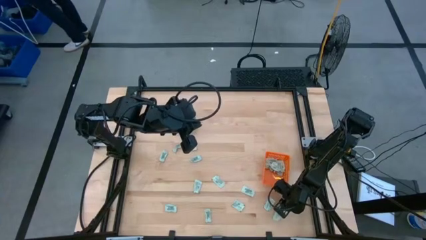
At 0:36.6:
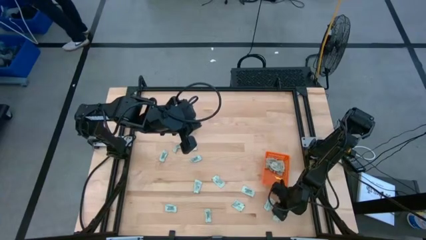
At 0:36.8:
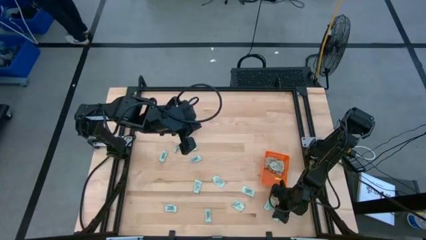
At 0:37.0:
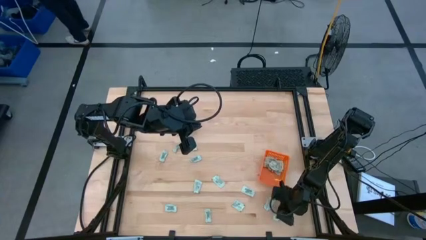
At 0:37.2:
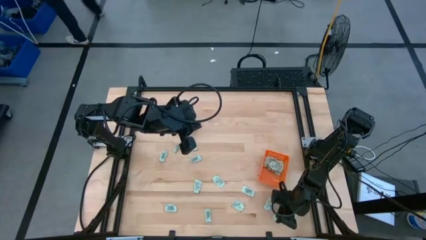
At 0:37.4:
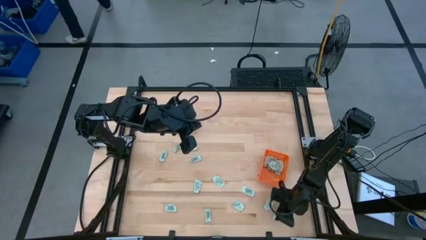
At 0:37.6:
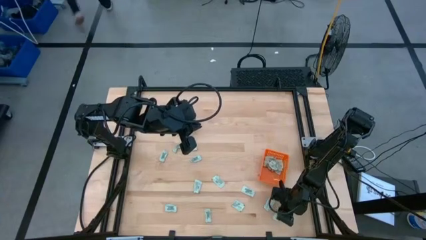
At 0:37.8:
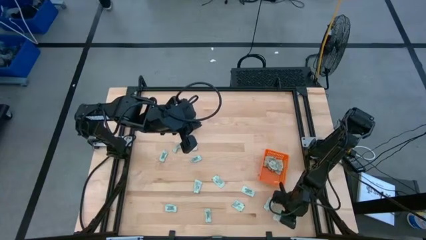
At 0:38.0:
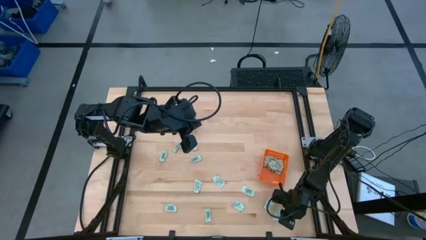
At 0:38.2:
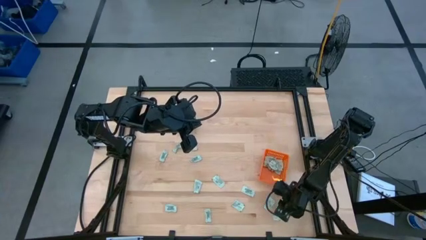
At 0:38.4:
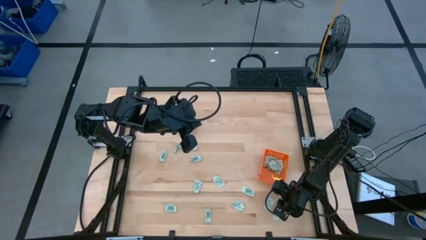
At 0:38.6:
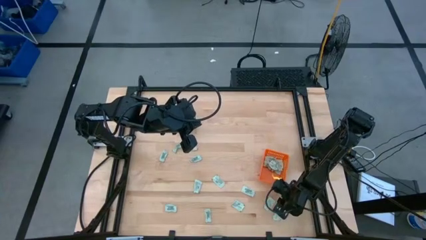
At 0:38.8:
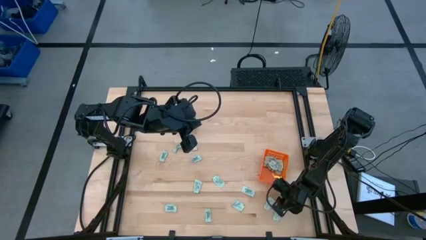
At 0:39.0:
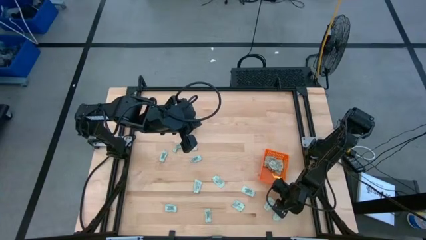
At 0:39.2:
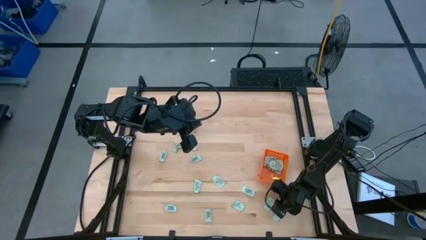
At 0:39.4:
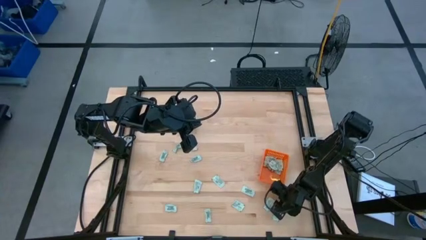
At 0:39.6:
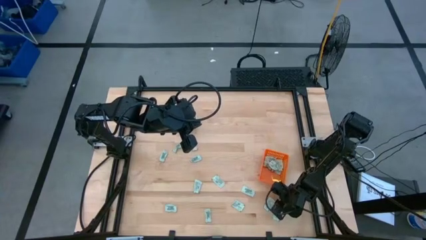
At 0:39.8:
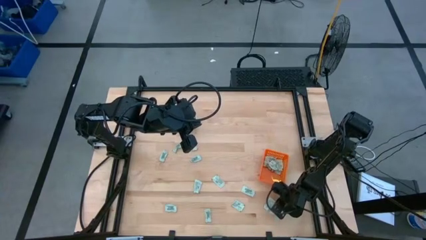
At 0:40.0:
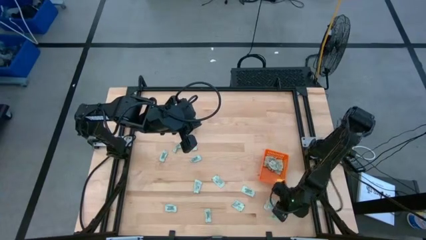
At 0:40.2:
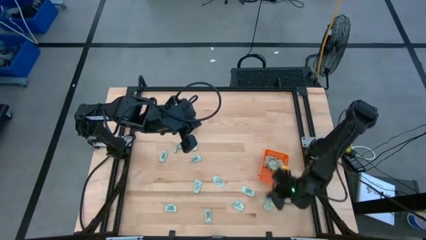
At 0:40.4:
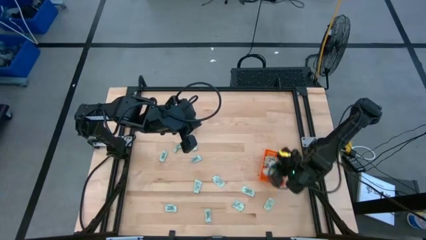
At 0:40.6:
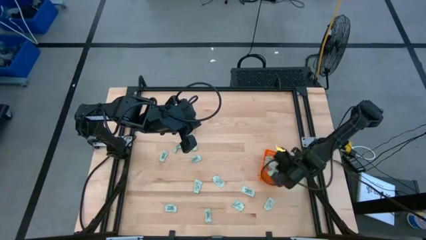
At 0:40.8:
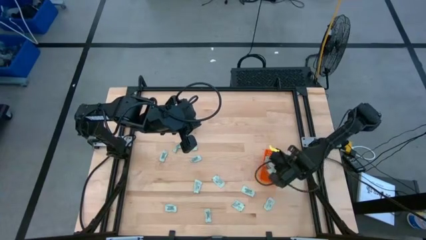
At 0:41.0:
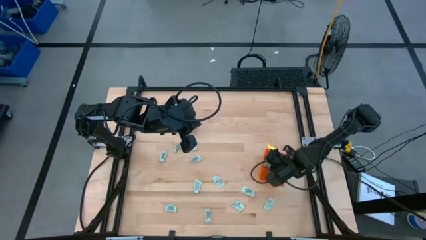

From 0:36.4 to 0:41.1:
Task: Pick and place Stevia / Truvia into bins
Put the stevia packet into the orange basket

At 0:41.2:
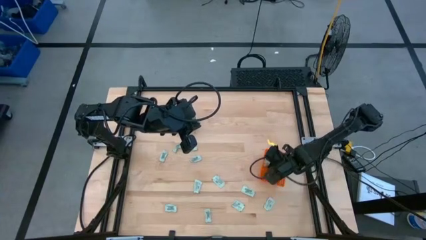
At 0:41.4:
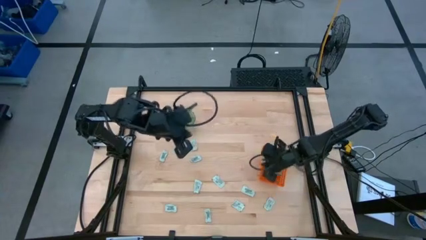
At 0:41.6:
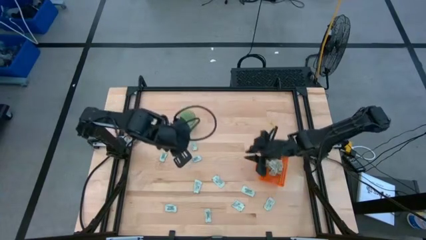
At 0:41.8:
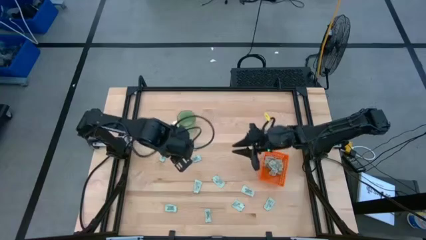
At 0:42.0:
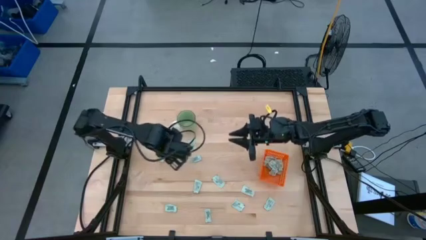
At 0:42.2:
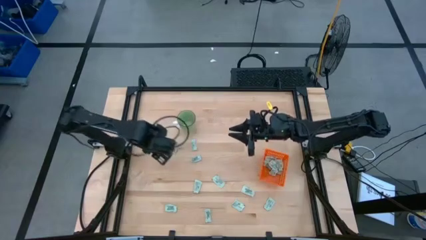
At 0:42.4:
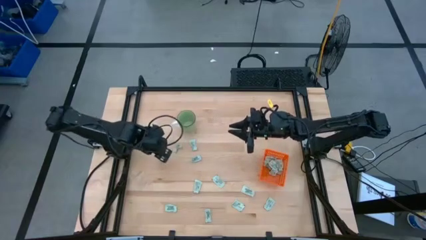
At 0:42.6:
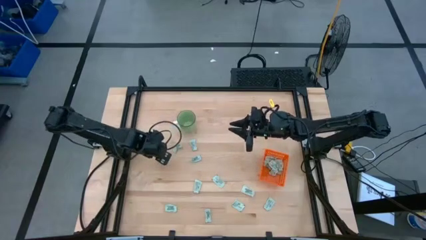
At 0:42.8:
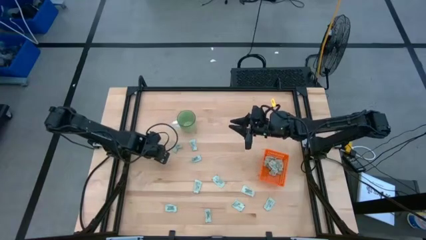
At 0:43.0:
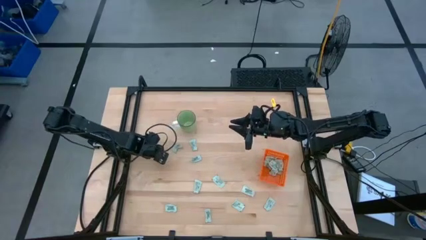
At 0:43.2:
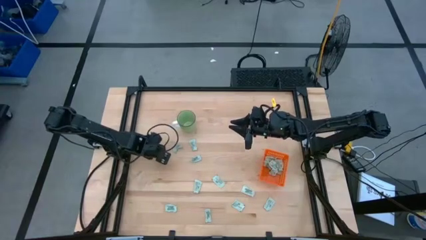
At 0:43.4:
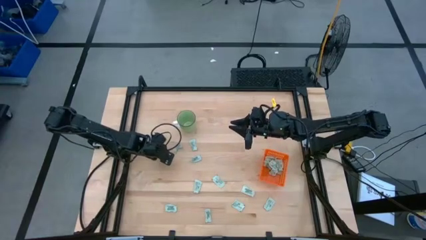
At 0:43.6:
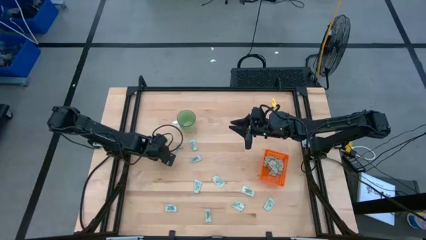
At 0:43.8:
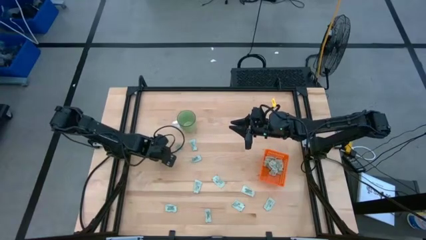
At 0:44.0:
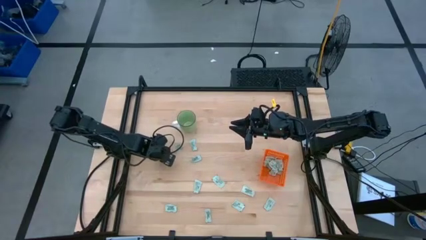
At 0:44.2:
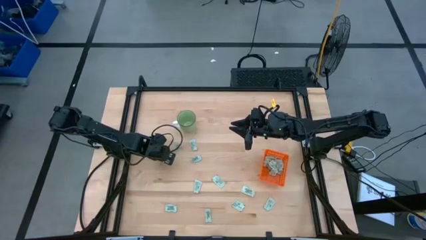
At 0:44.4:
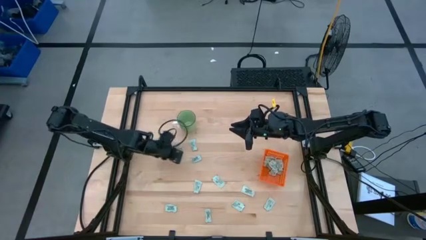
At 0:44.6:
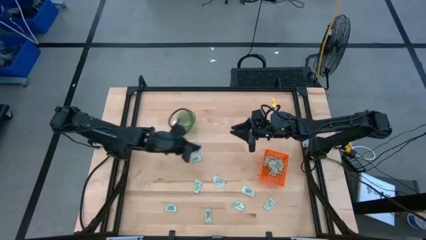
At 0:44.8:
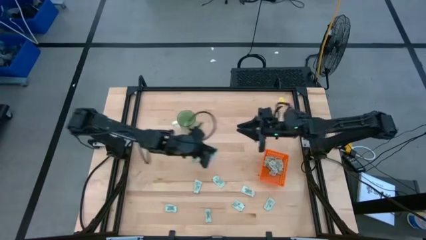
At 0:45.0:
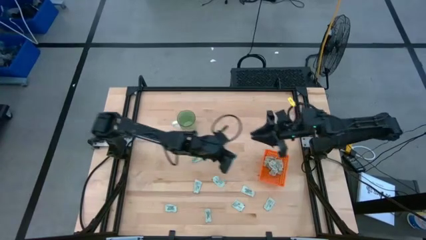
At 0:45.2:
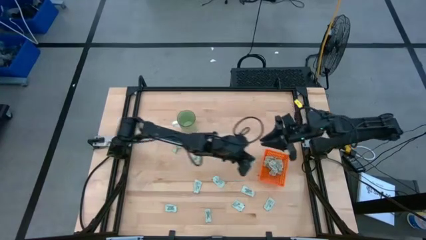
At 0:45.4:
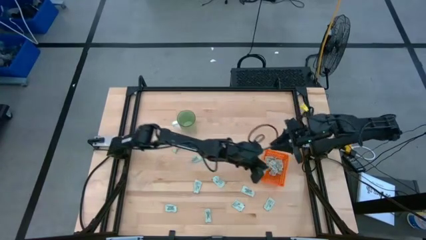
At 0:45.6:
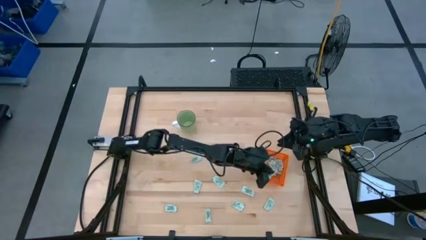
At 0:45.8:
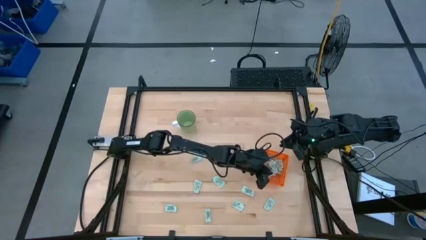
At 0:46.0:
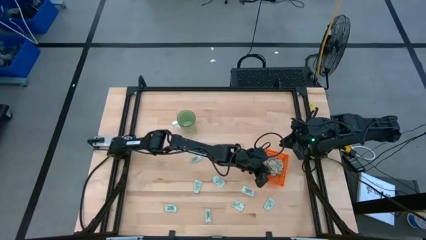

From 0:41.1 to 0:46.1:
Put the stevia packet into the orange basket

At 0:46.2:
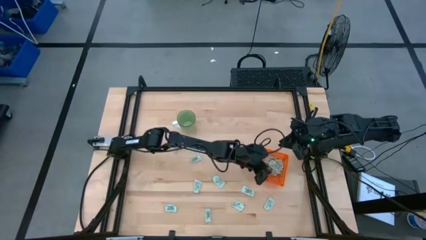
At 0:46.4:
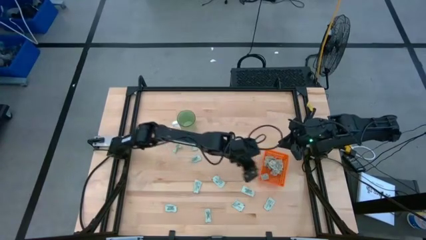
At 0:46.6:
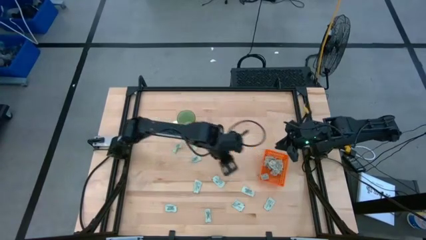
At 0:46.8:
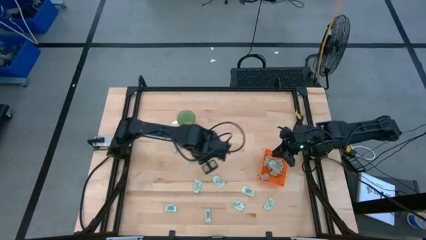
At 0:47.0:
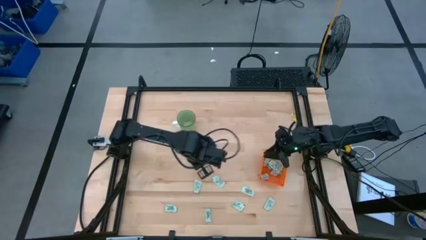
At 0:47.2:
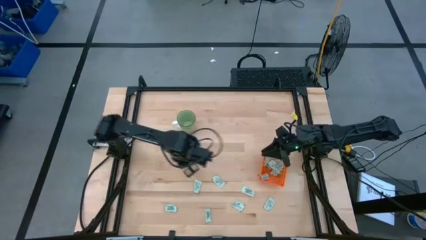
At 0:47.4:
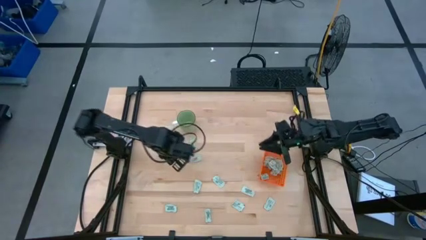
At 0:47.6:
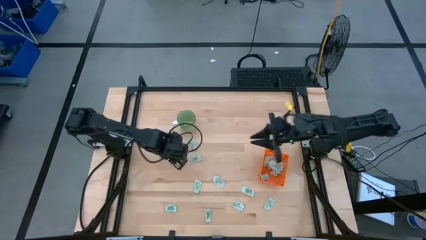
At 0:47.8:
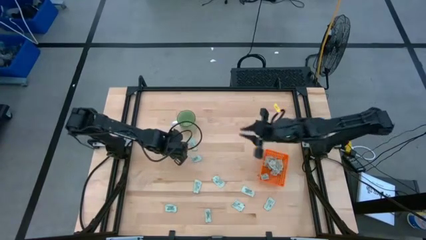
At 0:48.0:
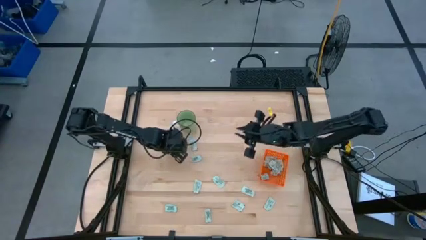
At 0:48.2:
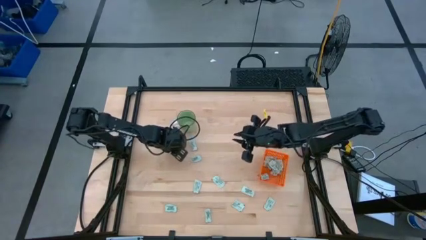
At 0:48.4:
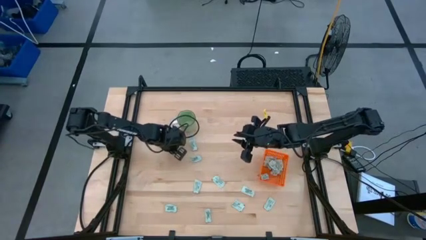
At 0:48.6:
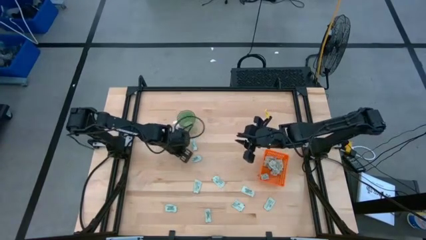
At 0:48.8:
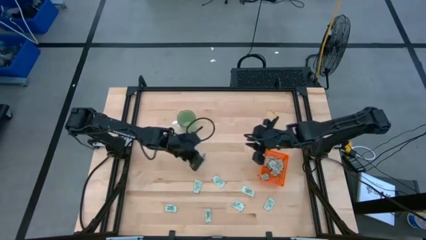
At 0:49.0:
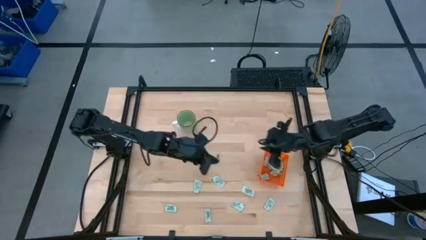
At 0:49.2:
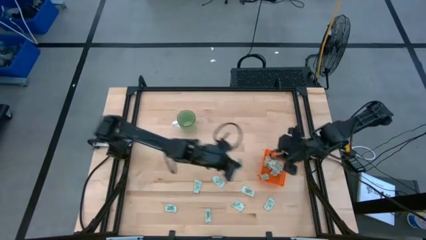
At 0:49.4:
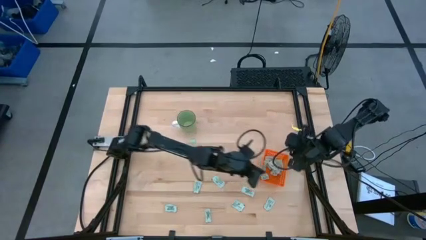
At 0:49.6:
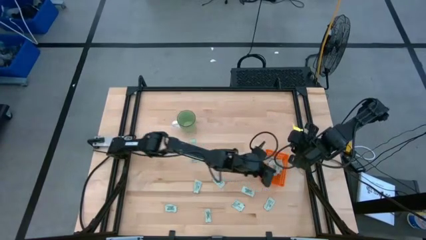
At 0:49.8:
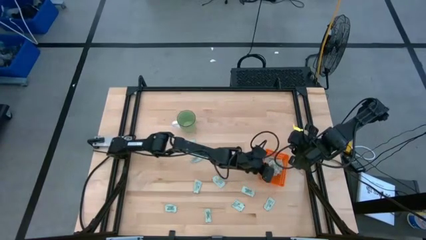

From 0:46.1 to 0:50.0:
Put the stevia packet into the orange basket

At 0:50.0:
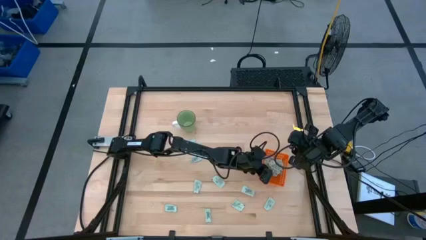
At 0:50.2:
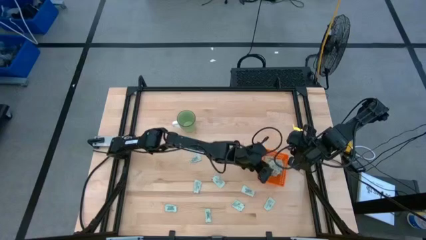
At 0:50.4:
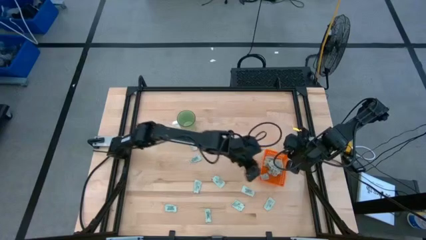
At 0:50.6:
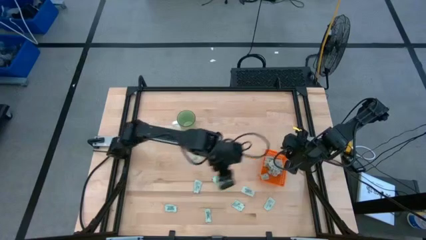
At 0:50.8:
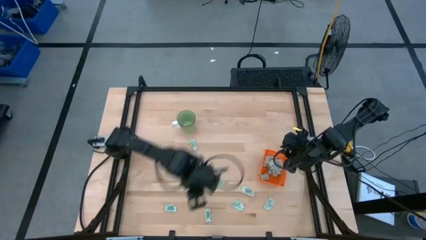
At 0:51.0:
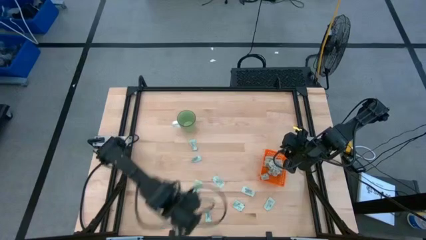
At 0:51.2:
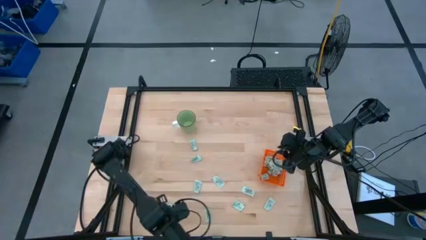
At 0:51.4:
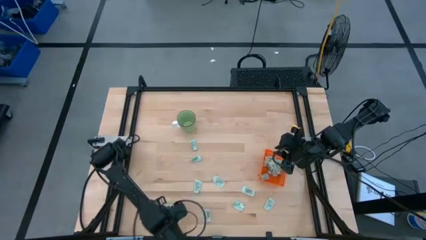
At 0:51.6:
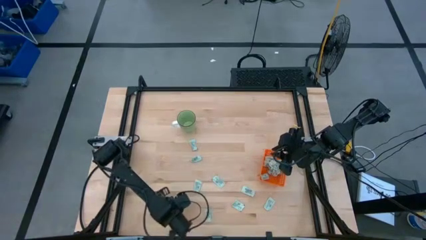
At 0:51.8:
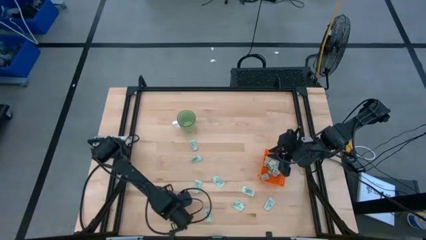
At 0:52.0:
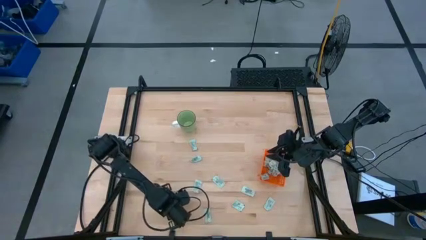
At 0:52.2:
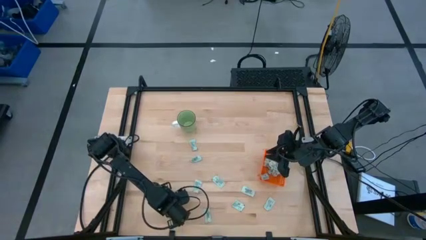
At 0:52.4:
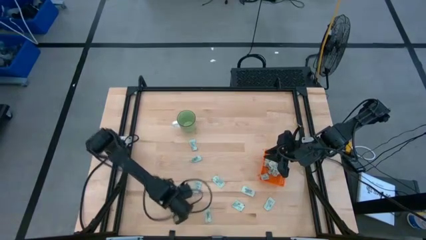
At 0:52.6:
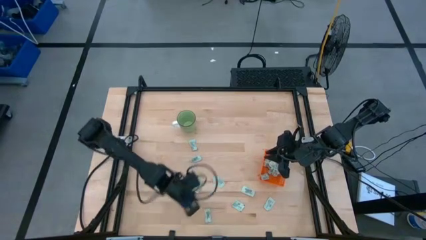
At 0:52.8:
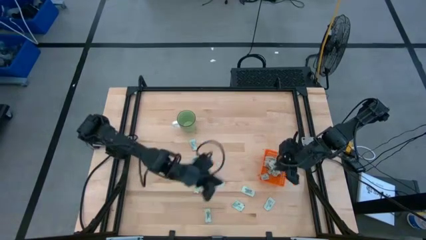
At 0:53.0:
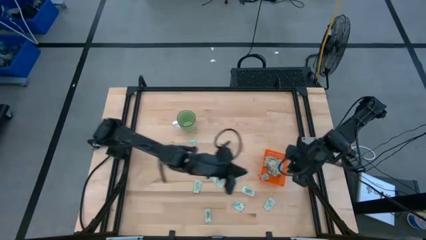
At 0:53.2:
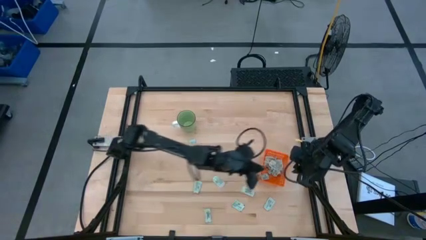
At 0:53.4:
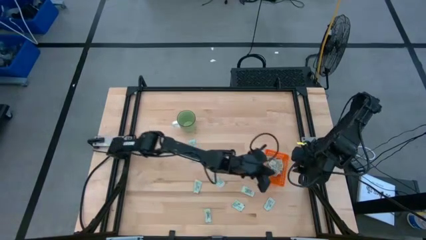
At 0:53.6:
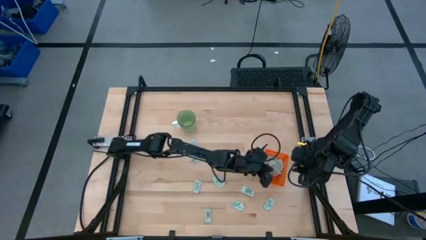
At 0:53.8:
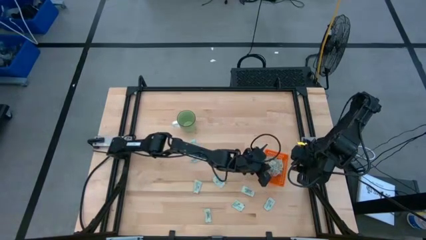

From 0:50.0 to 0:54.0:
Put the stevia packet into the orange basket
